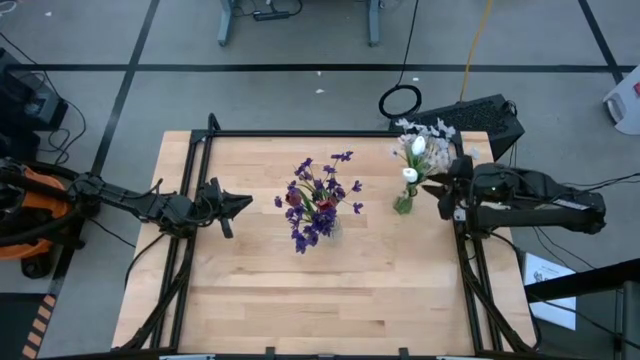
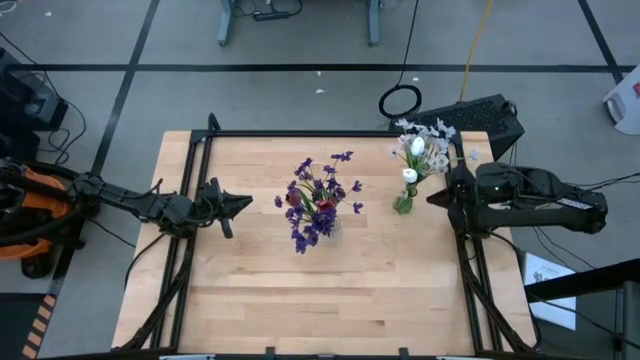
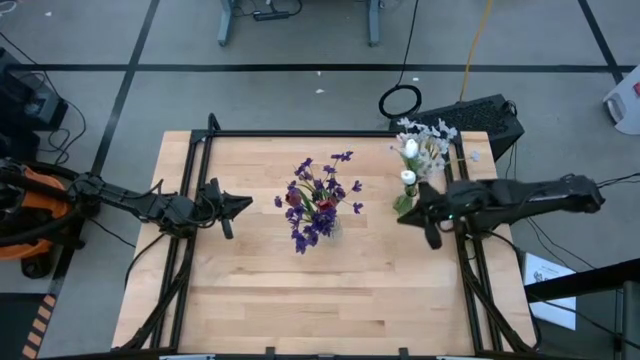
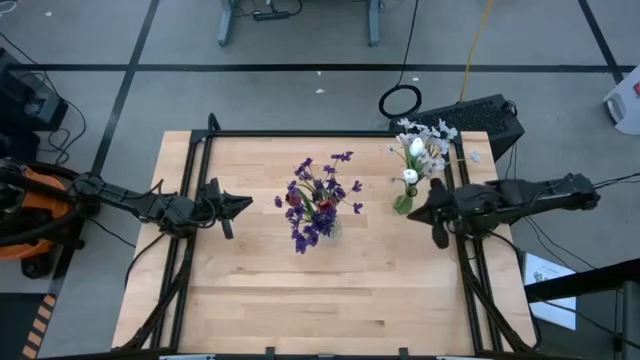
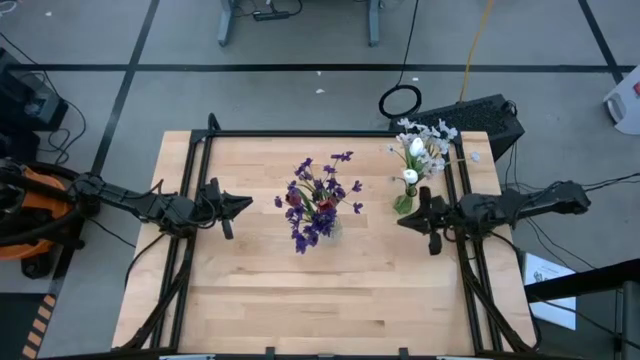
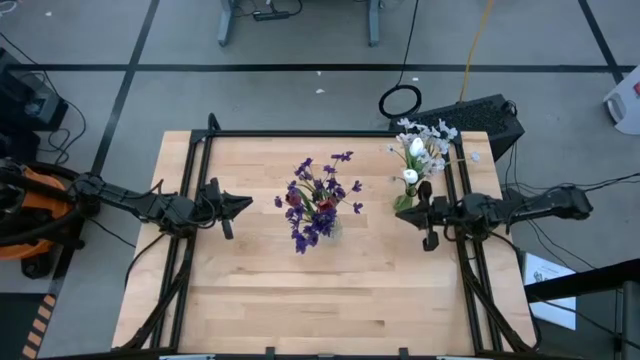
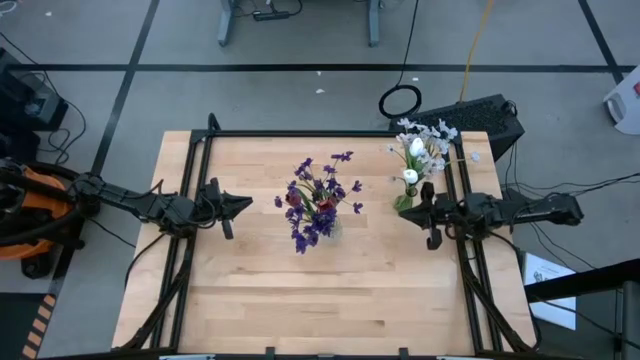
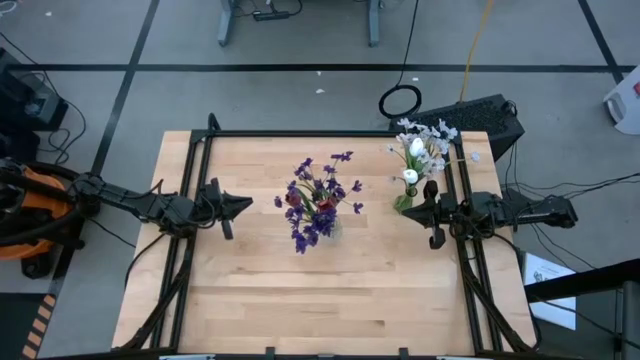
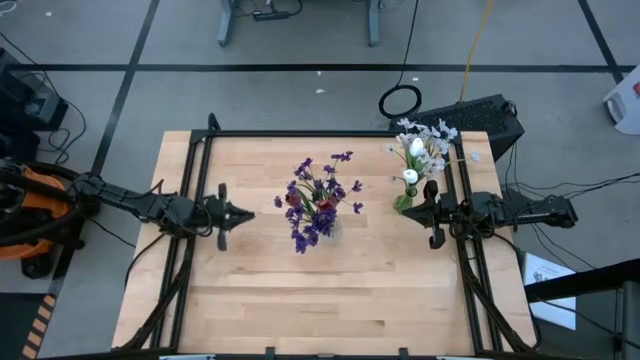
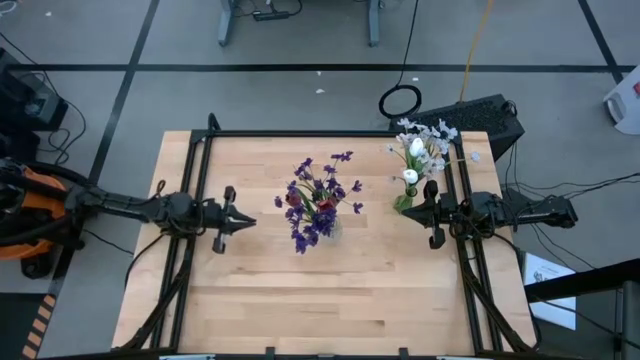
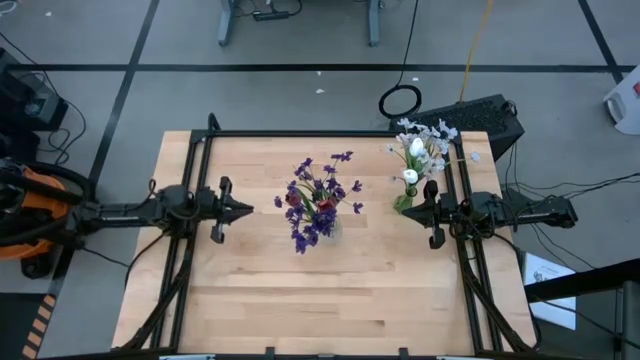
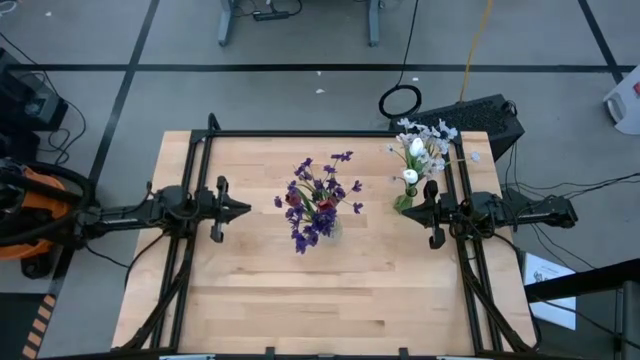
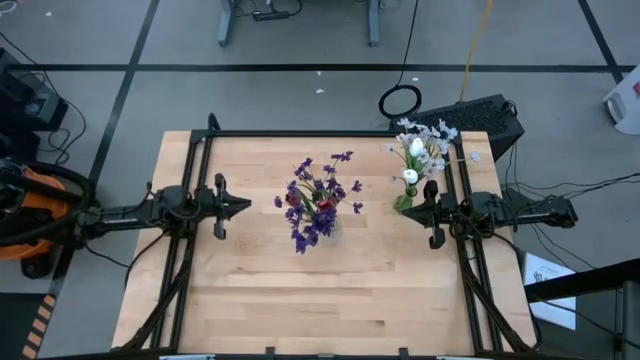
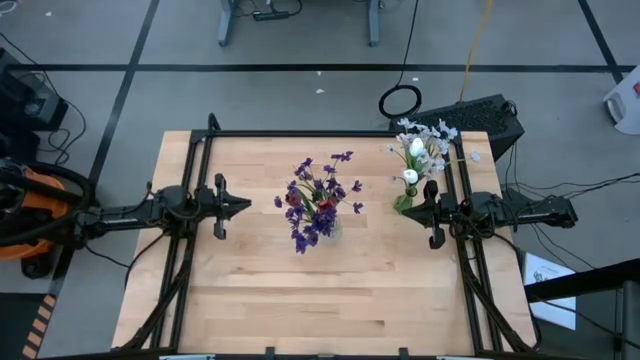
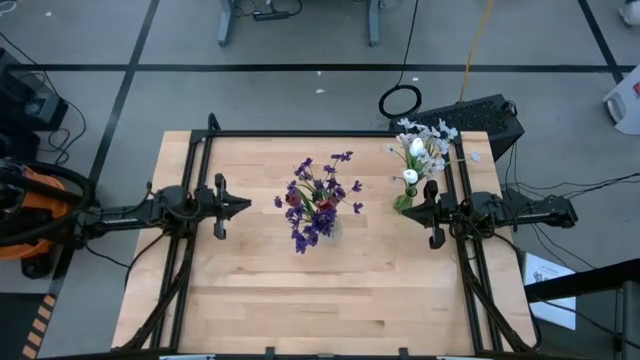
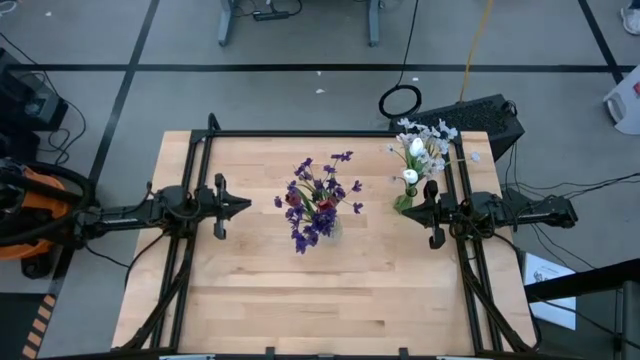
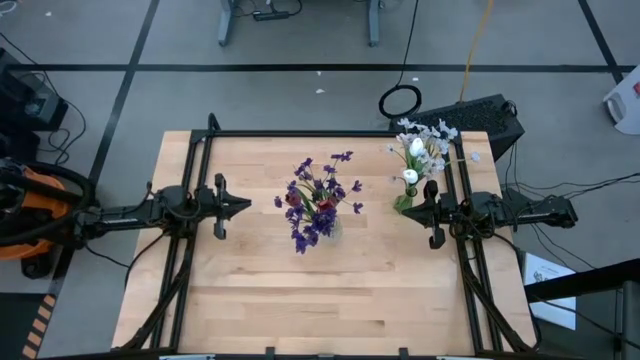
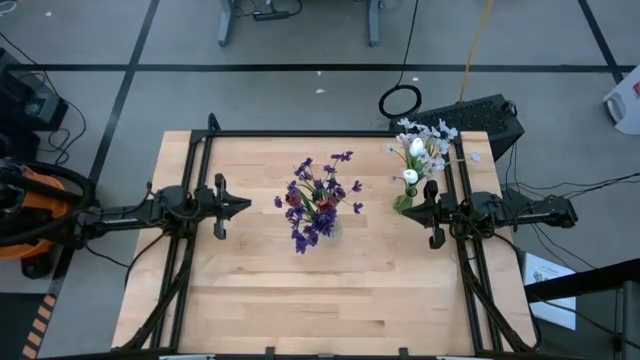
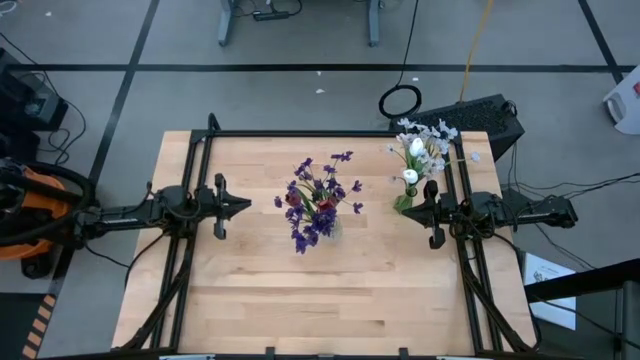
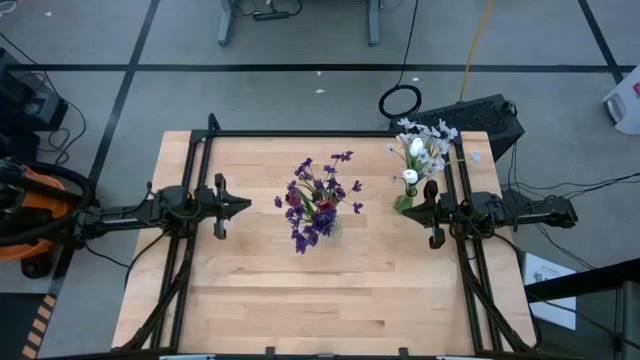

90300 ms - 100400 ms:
Task: Sort flowers into vase by color
Return to Home Position

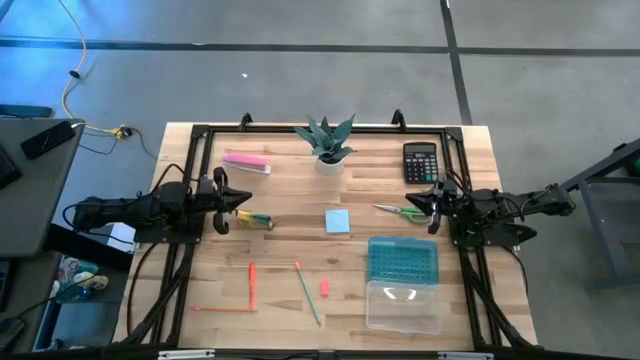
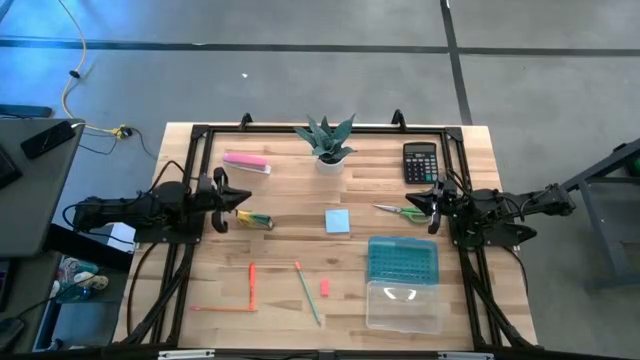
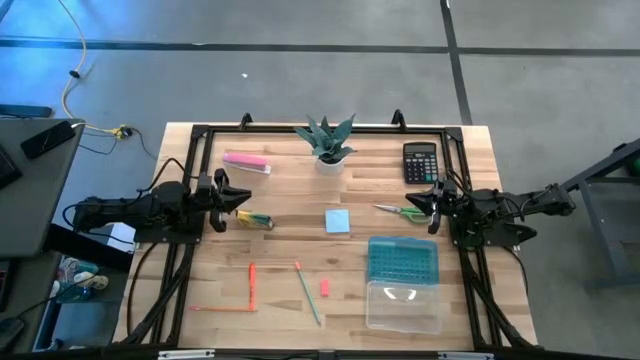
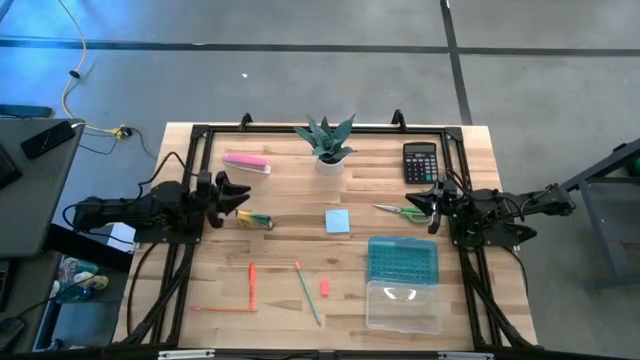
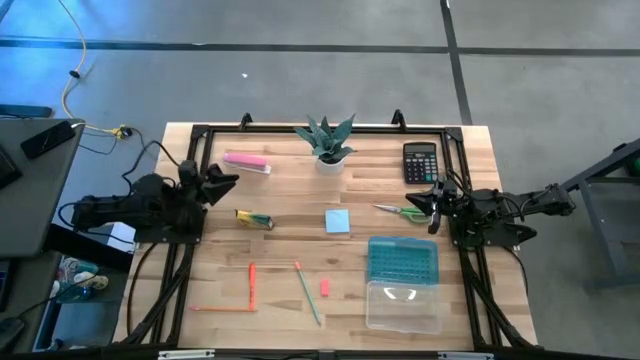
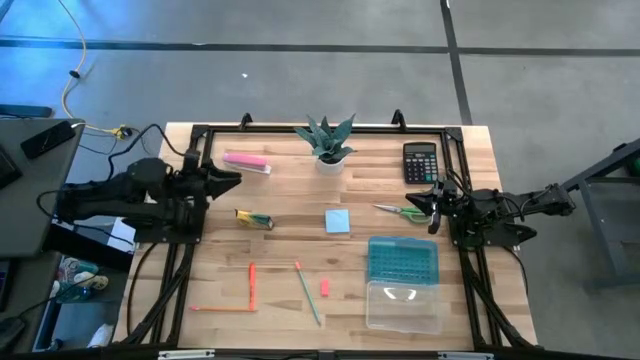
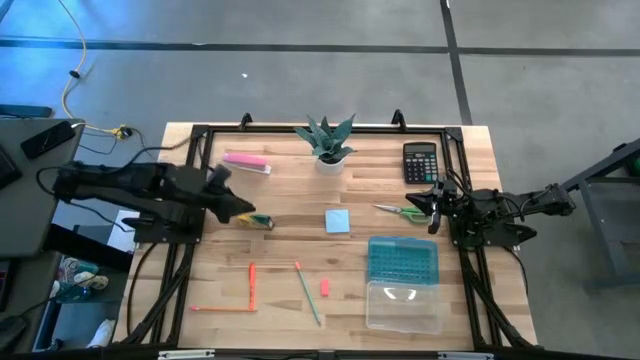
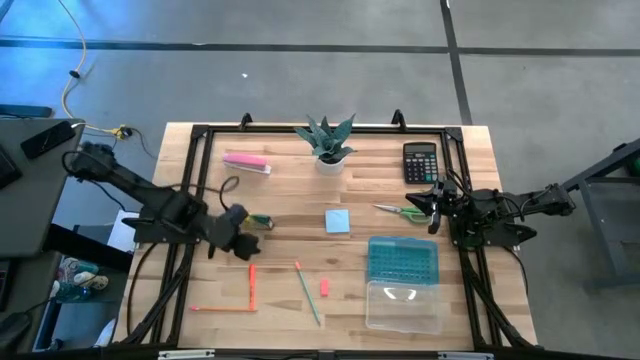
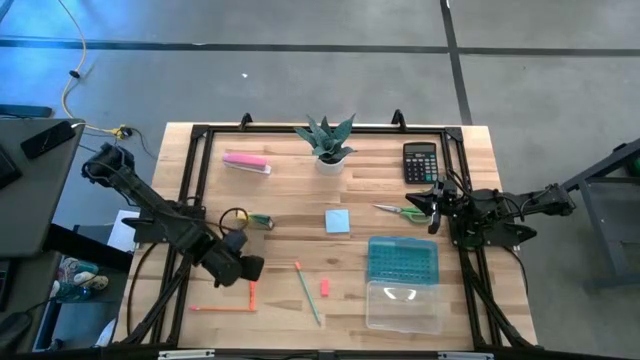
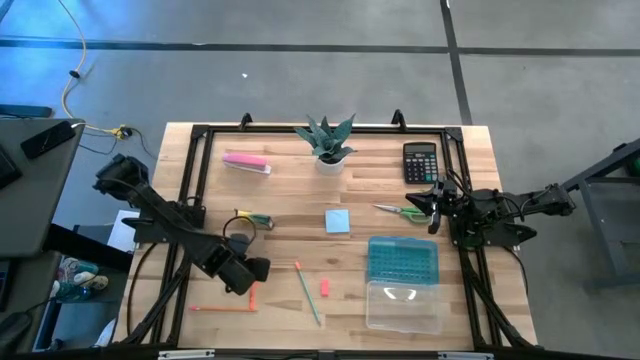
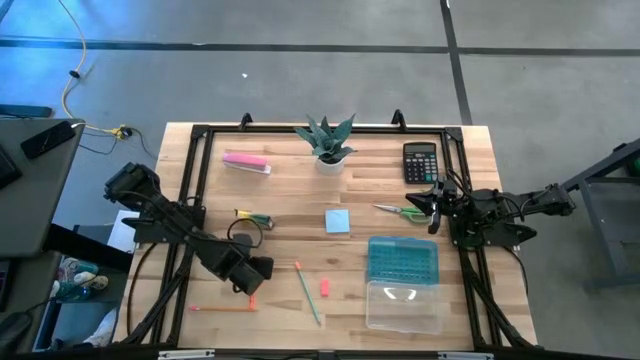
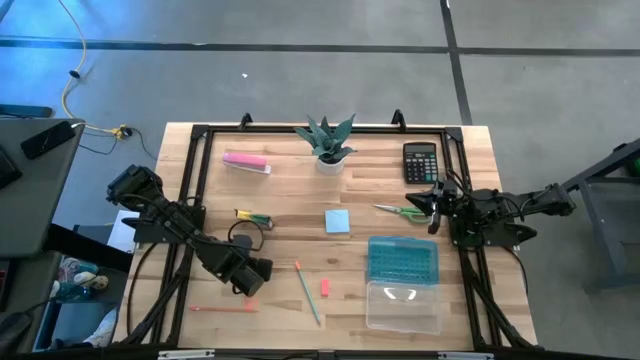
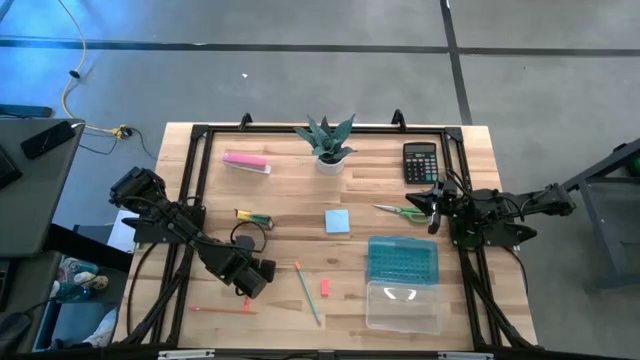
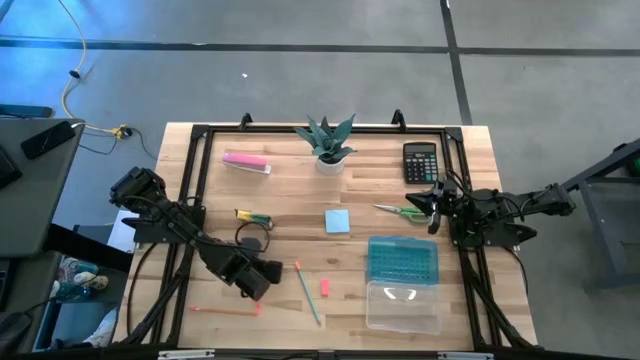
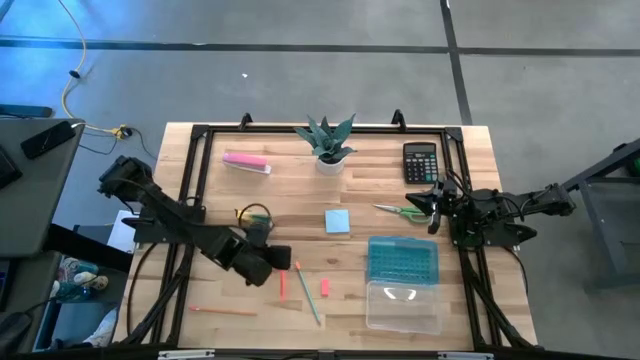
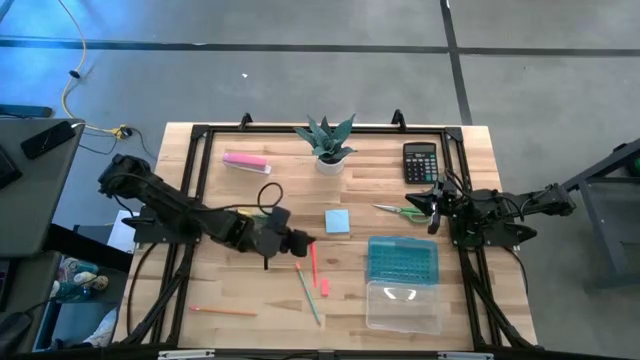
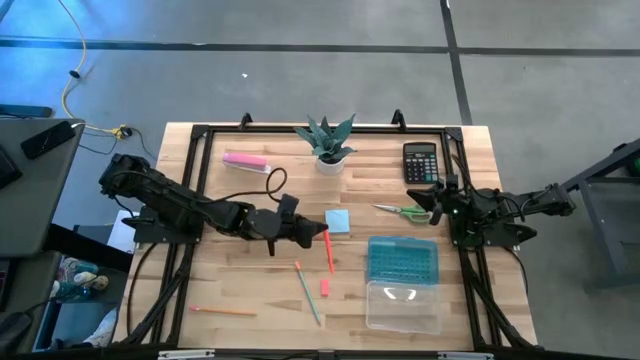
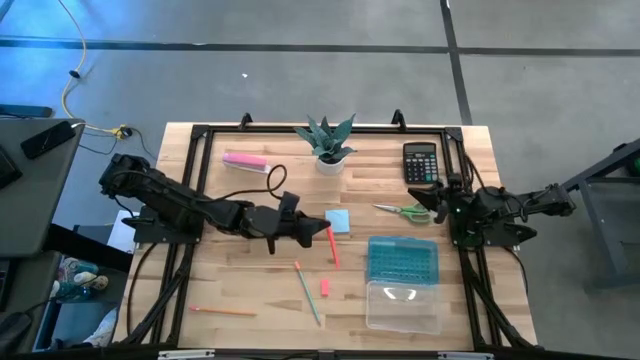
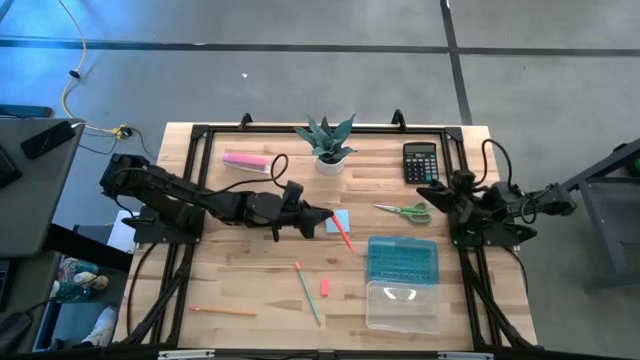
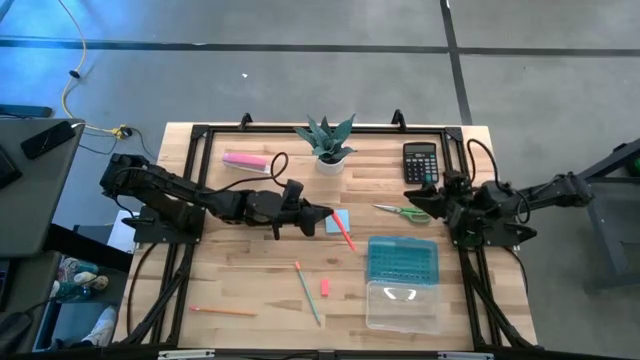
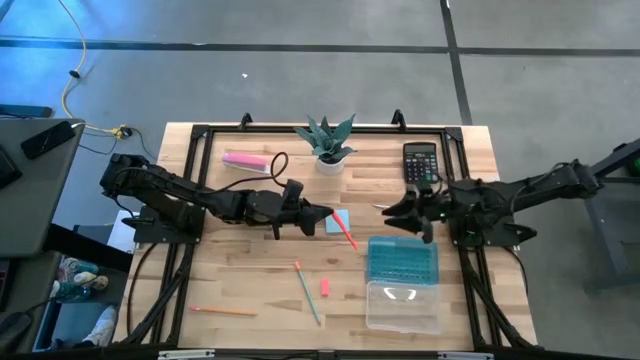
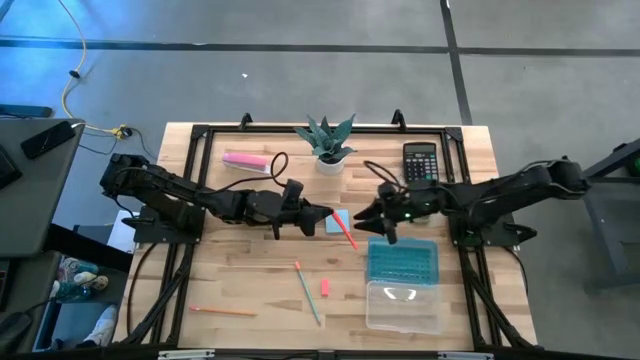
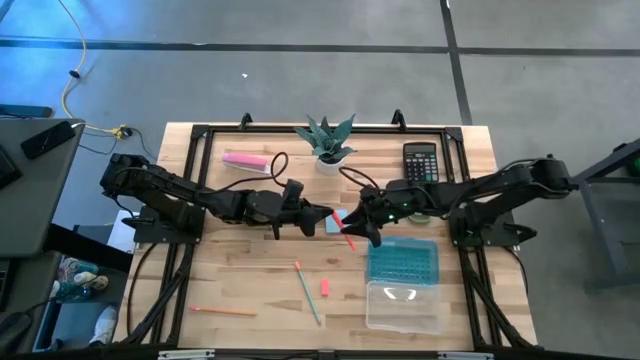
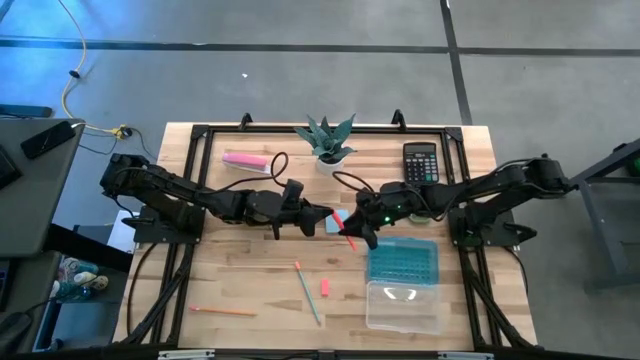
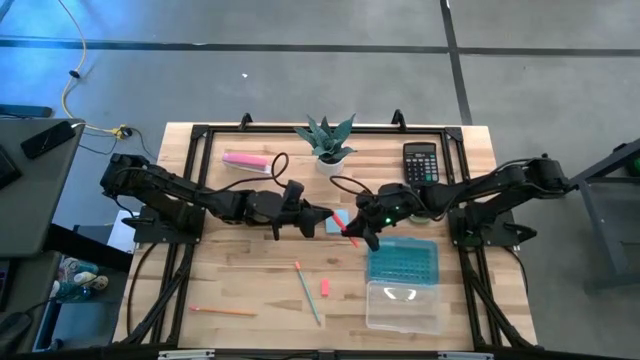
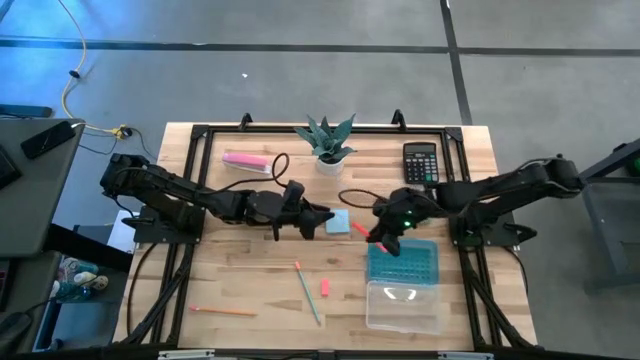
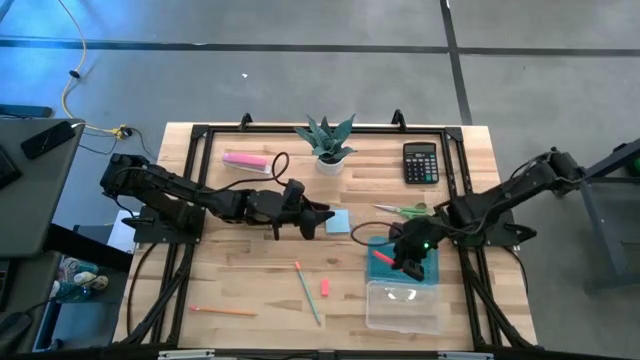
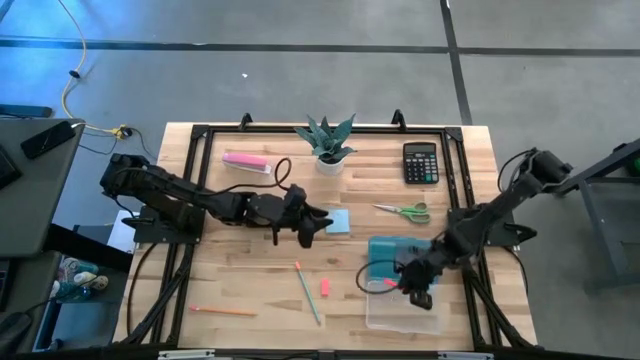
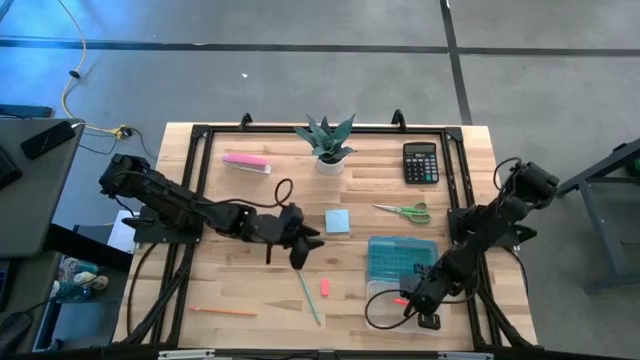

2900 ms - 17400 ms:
Task: Pack school essentials
Put the orange pen into the blue supply box
